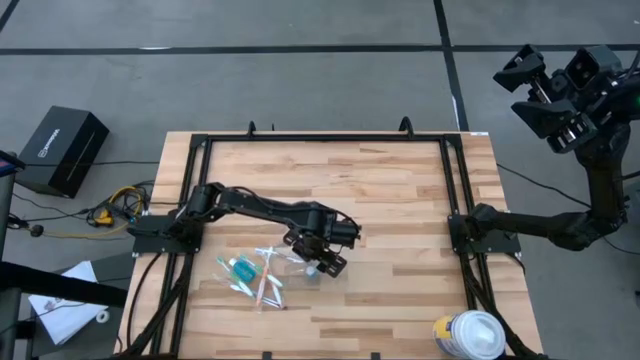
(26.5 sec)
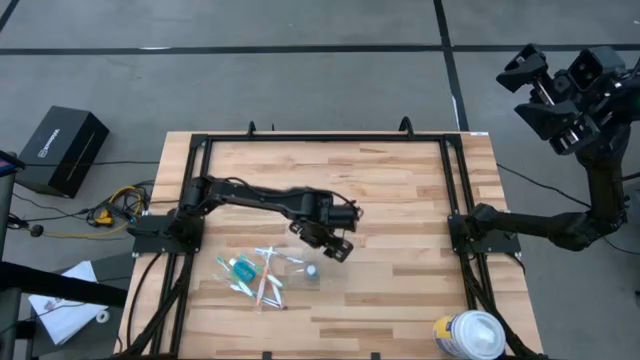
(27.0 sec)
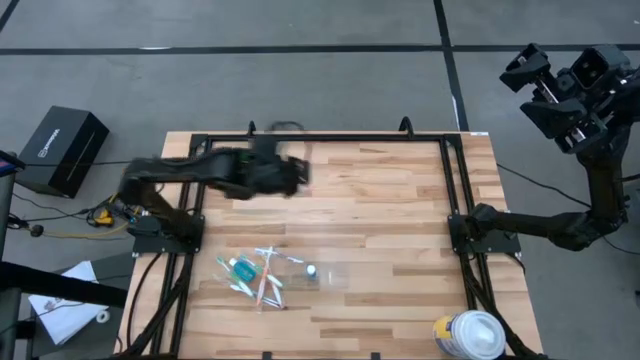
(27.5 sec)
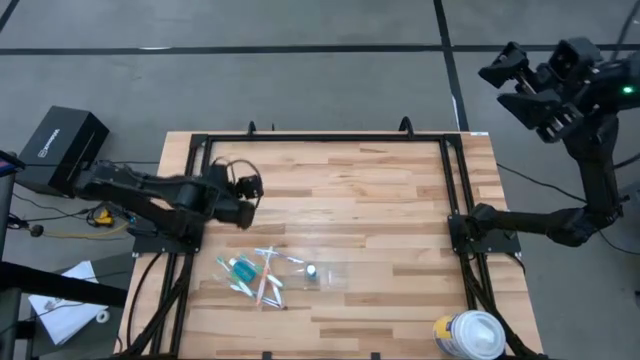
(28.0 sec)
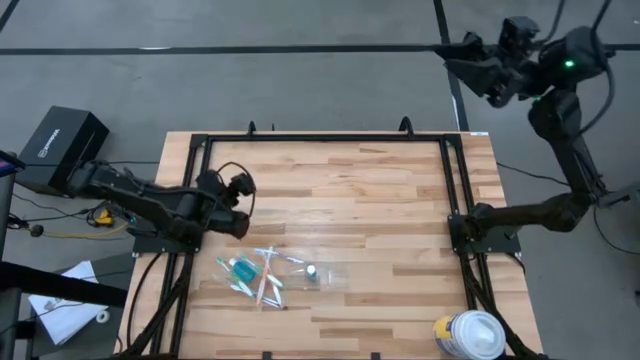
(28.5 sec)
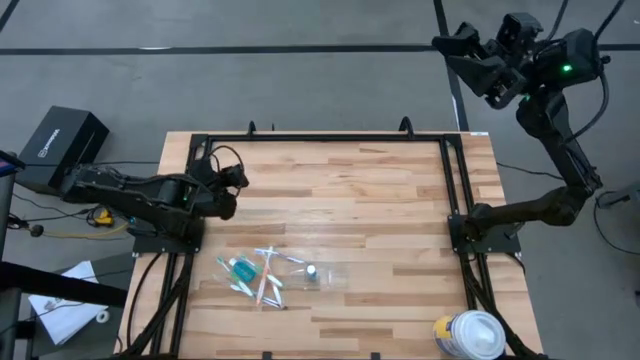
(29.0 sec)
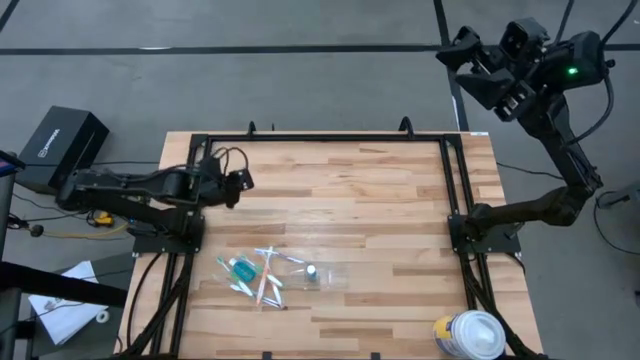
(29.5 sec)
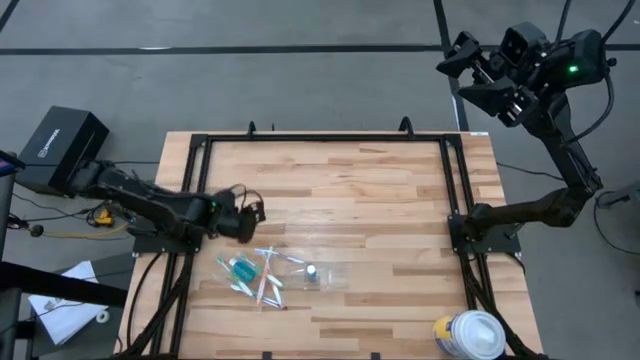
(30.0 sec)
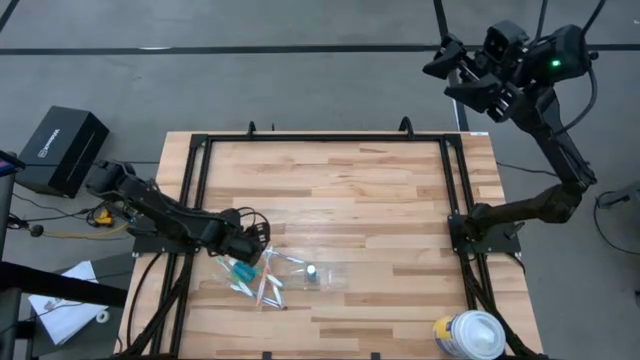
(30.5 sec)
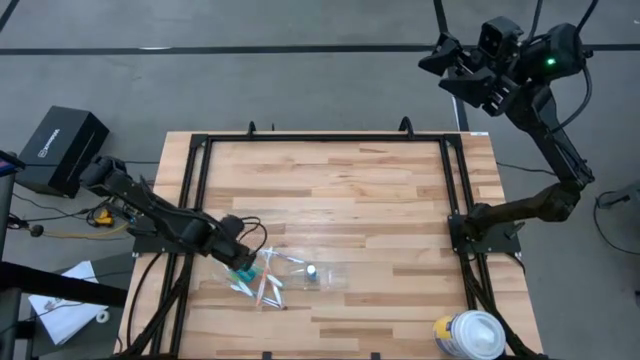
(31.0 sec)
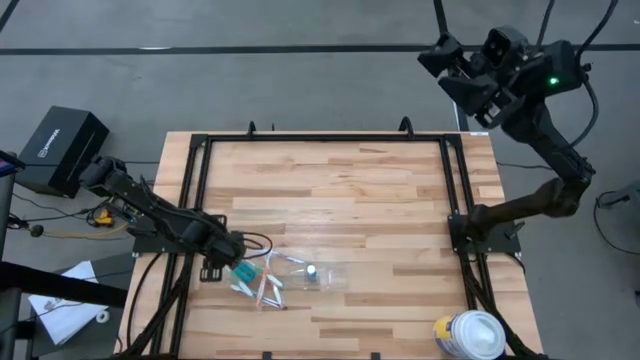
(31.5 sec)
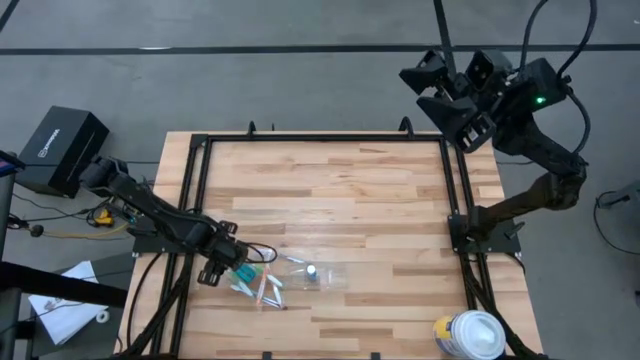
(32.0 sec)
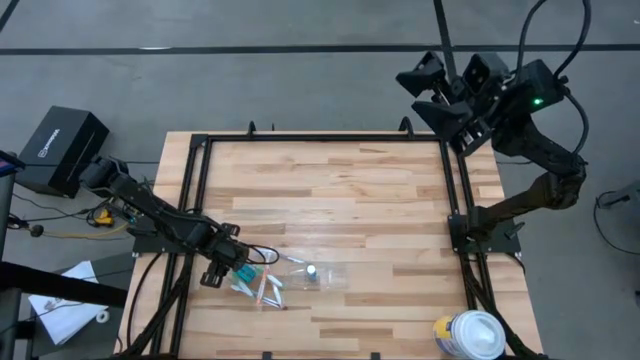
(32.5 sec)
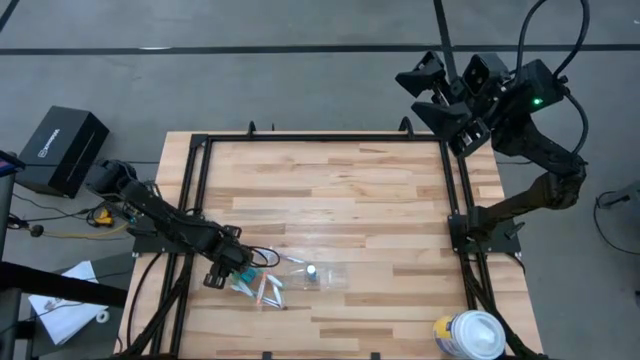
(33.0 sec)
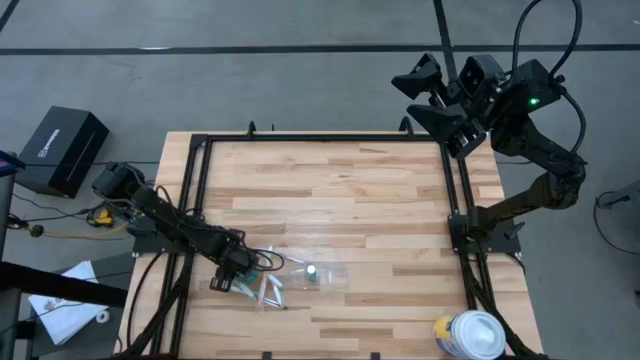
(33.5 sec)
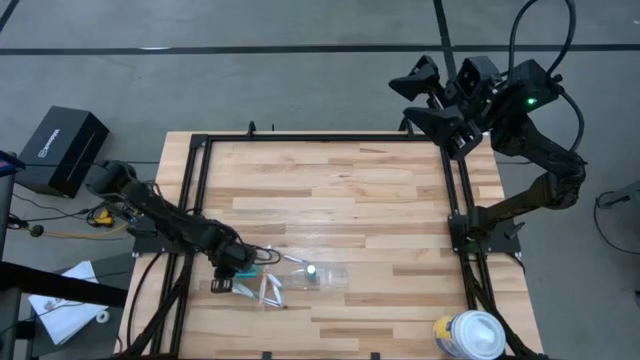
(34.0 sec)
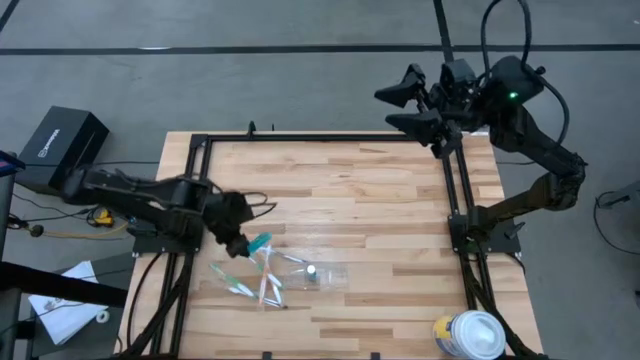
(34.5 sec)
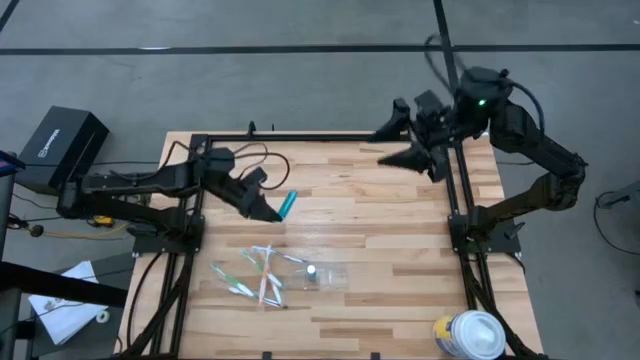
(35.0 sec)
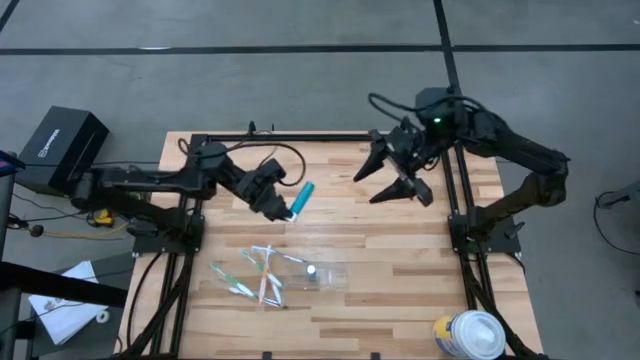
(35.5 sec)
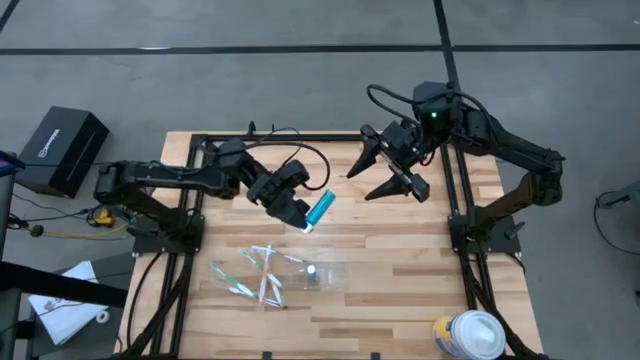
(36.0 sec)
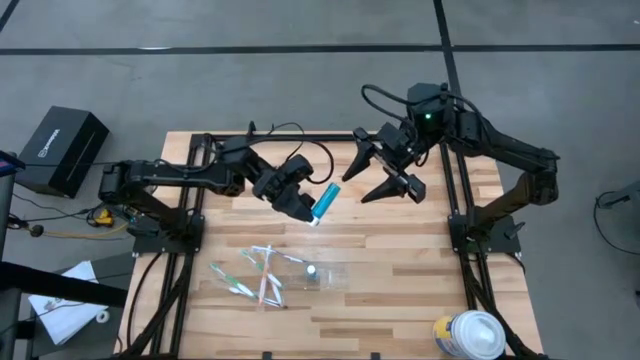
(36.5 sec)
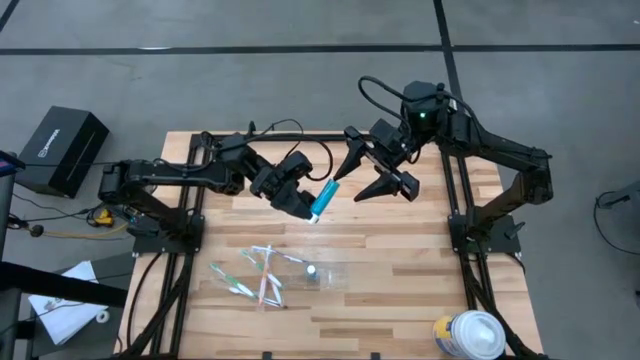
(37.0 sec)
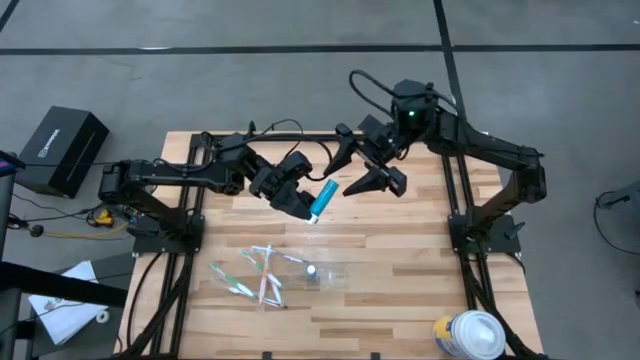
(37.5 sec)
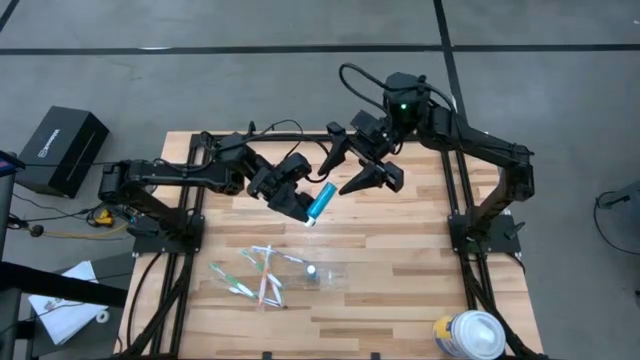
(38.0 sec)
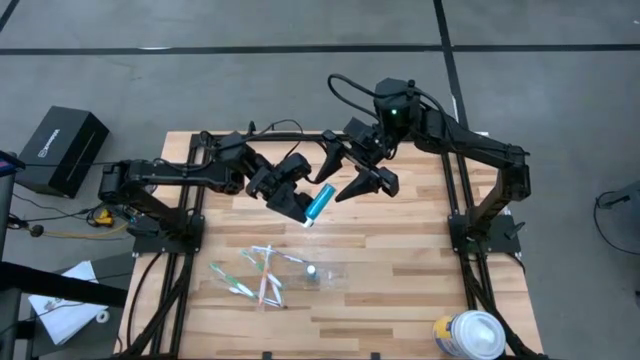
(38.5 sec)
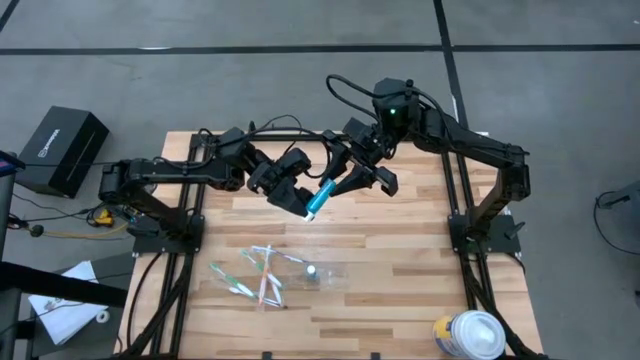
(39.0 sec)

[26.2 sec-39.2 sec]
Task: Pick & Place toothbrushing station
Put the blue mouthwash into the transparent organizer

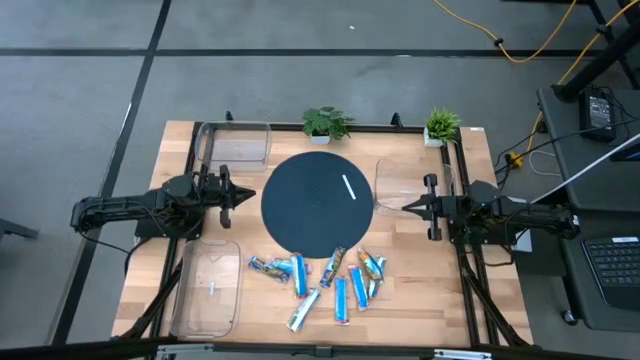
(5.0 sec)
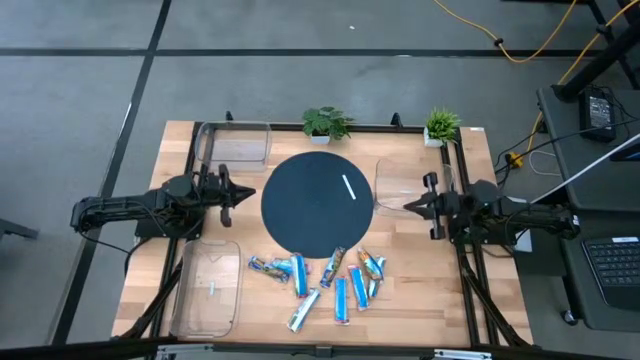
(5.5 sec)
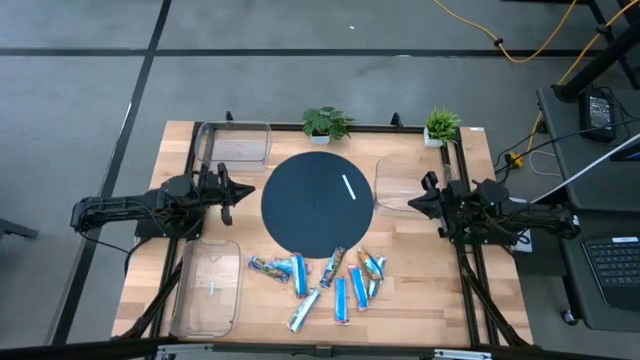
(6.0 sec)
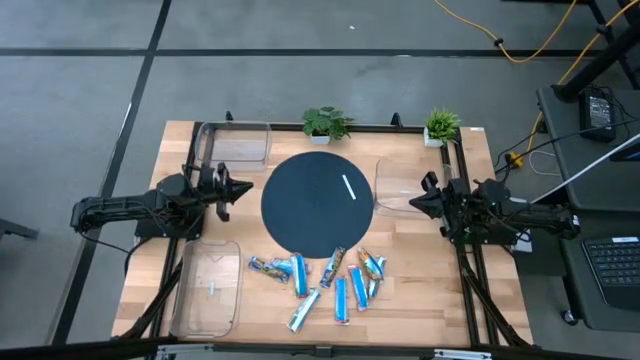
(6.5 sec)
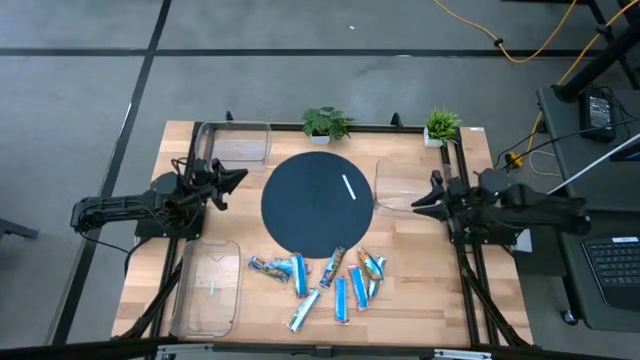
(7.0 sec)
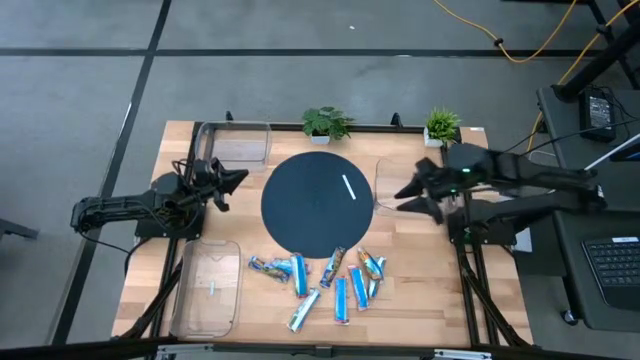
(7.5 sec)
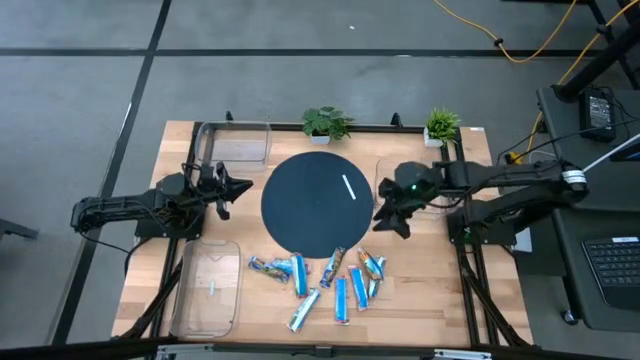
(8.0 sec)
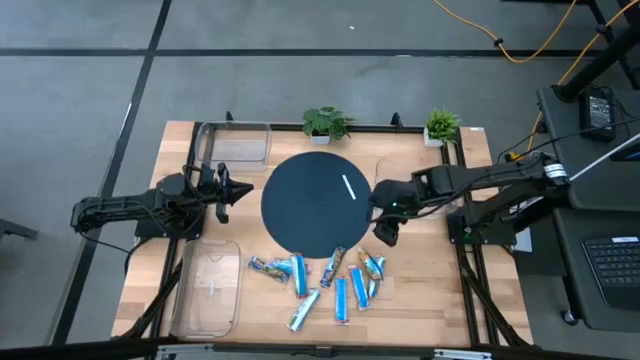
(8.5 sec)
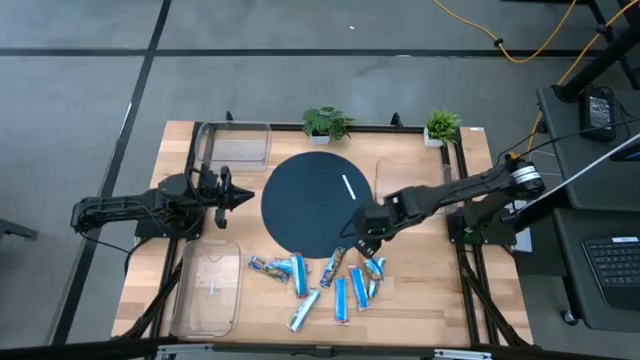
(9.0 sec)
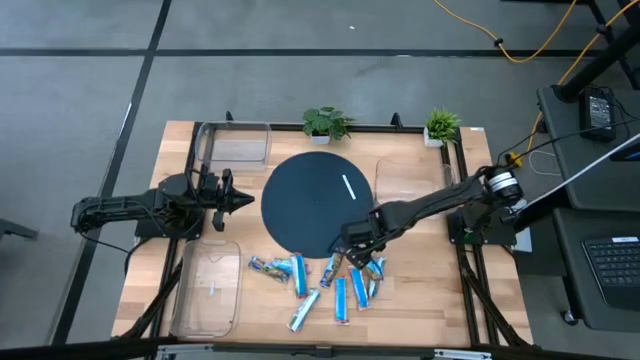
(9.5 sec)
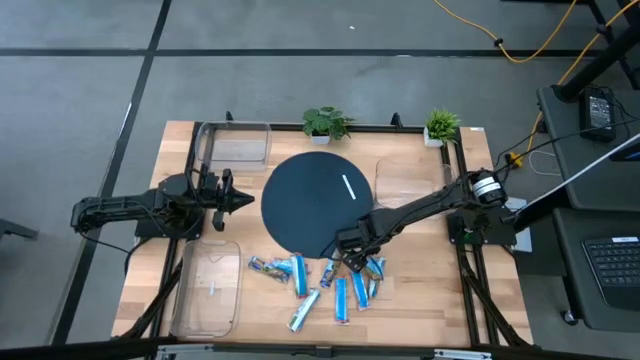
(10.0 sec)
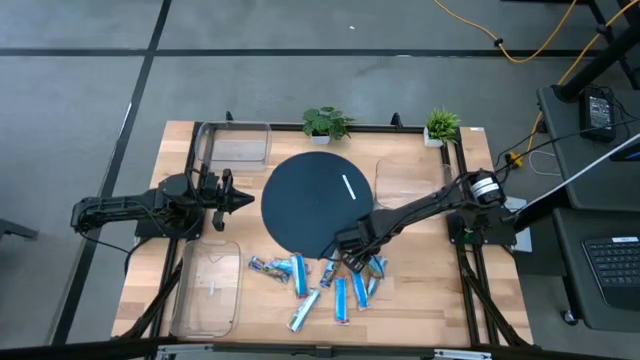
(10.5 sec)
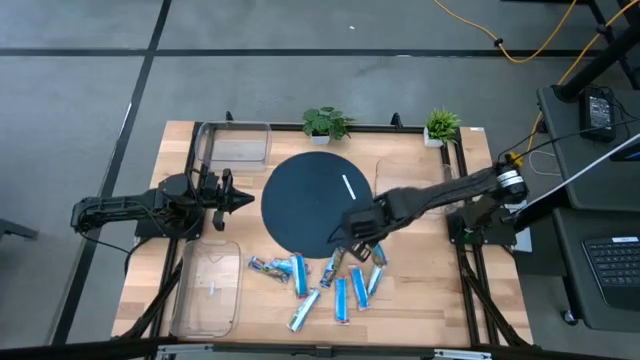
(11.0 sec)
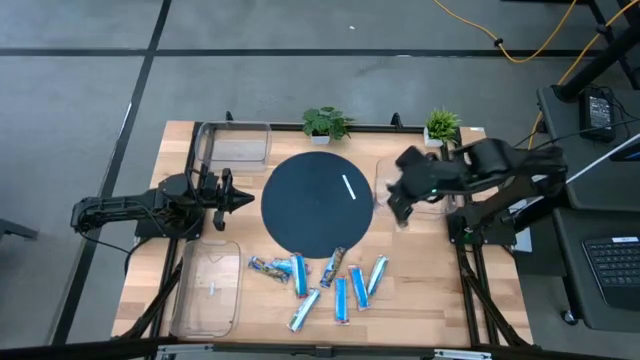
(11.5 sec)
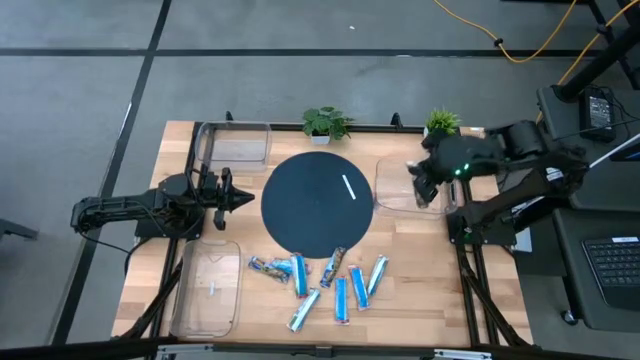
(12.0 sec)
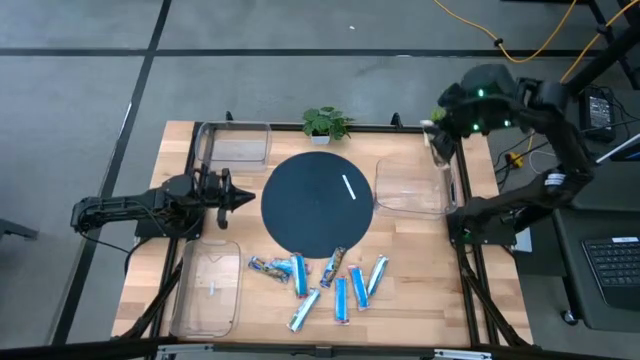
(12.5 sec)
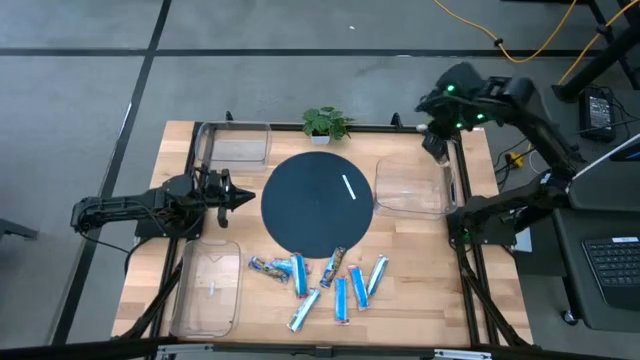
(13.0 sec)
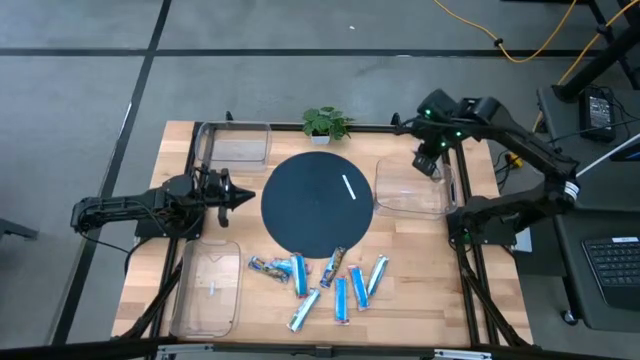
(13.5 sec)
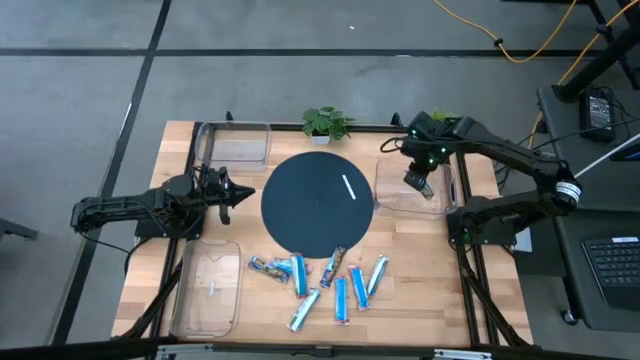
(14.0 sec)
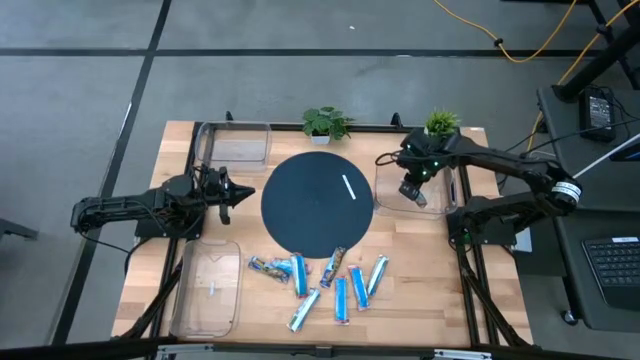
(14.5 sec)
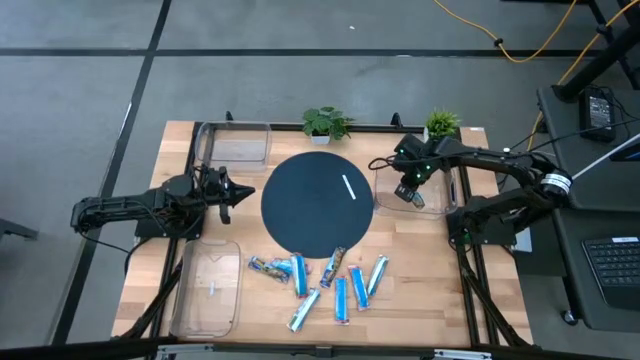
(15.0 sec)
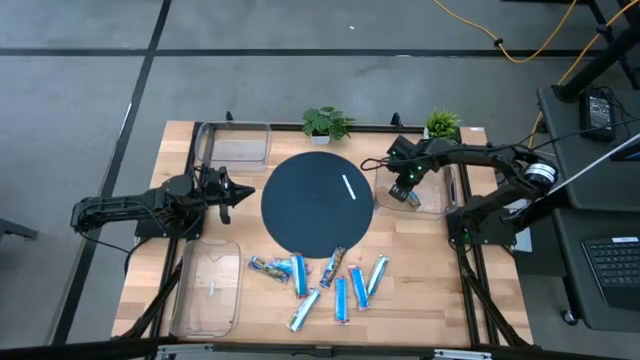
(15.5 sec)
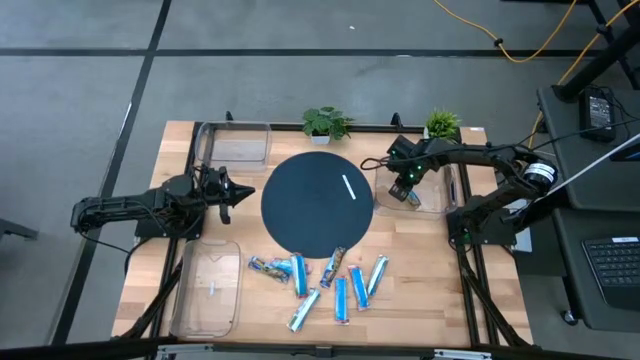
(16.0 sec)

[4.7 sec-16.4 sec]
Task: Pick and place Granola Bars by type
Put the yellow granola bar into the top right transparent bin
